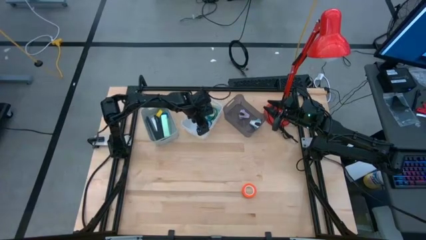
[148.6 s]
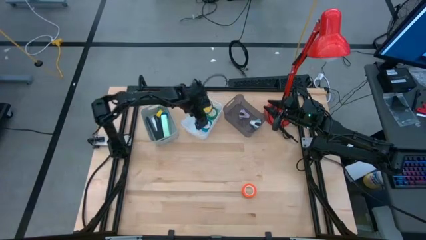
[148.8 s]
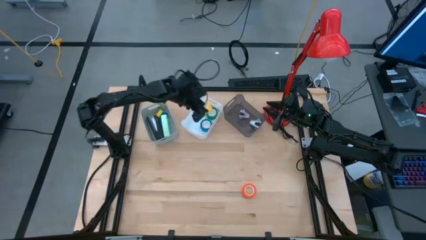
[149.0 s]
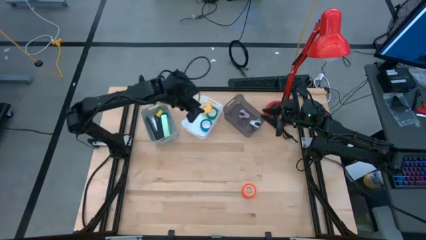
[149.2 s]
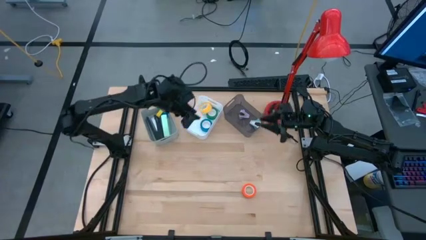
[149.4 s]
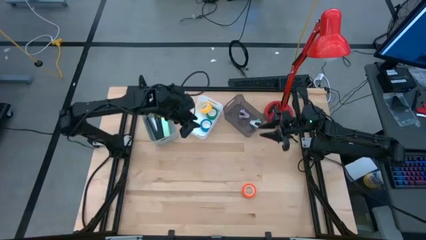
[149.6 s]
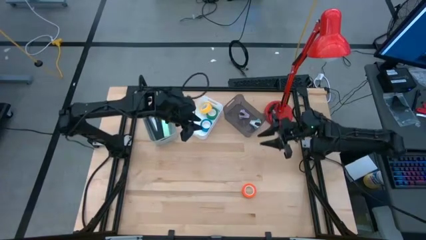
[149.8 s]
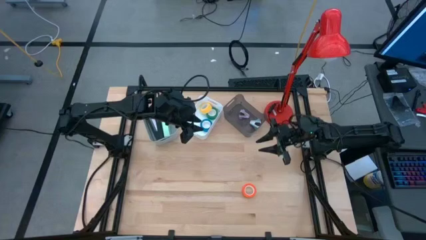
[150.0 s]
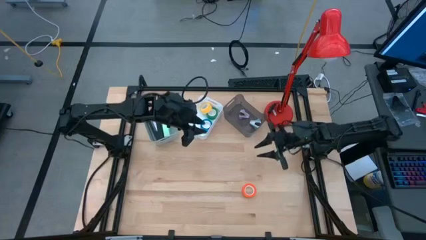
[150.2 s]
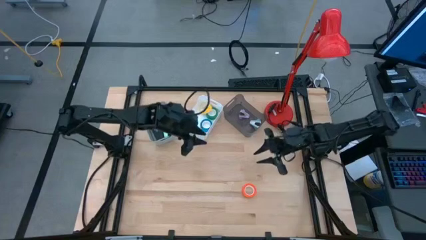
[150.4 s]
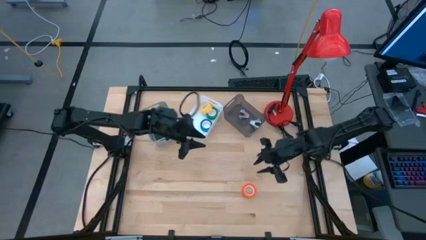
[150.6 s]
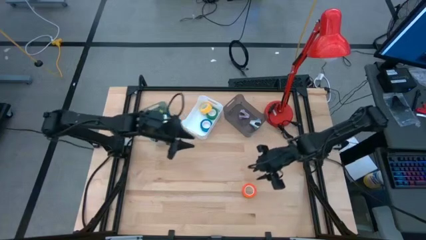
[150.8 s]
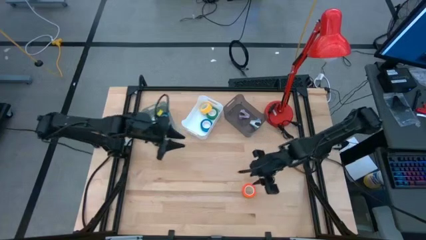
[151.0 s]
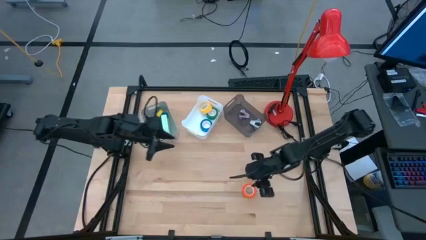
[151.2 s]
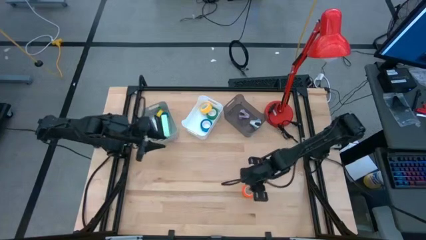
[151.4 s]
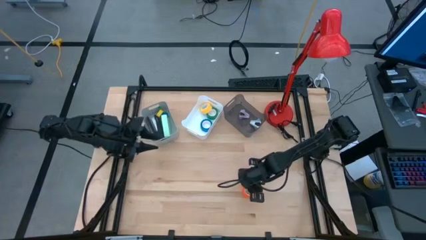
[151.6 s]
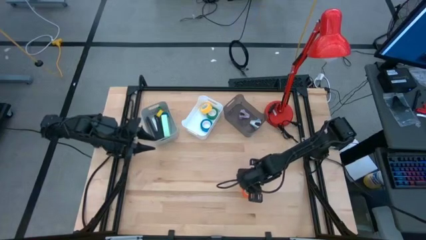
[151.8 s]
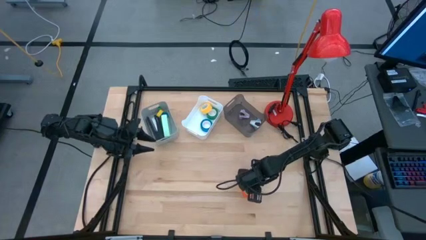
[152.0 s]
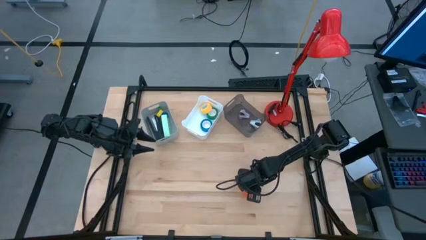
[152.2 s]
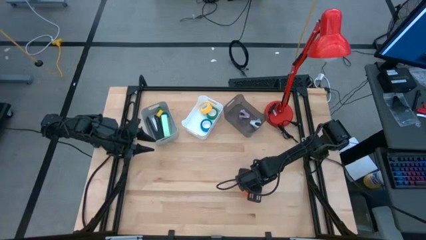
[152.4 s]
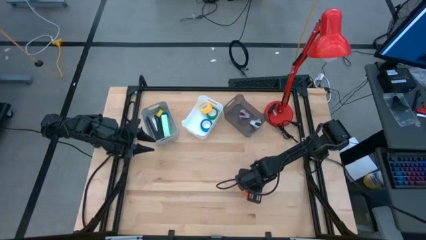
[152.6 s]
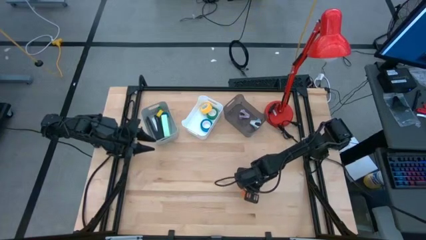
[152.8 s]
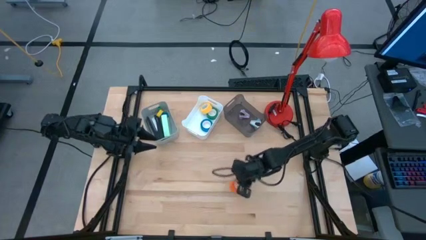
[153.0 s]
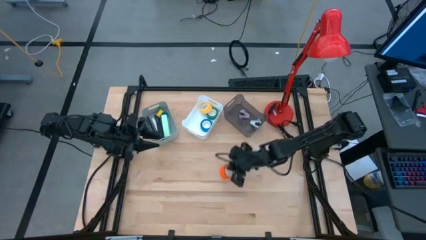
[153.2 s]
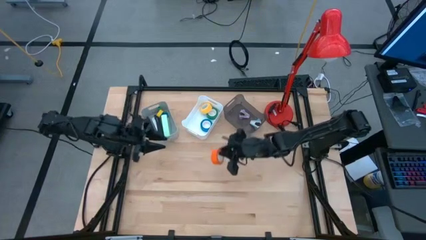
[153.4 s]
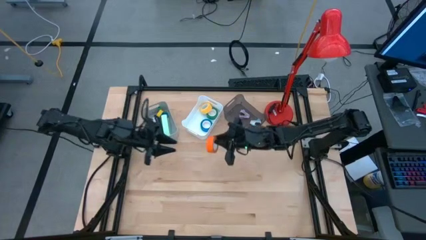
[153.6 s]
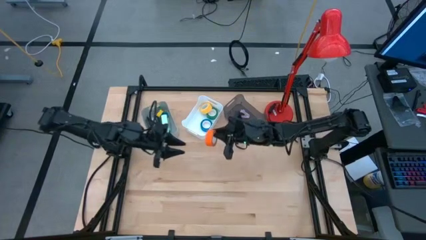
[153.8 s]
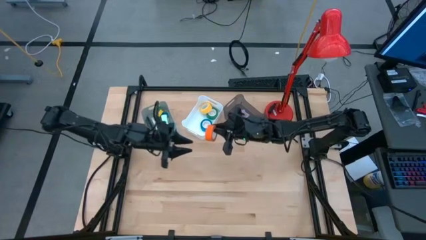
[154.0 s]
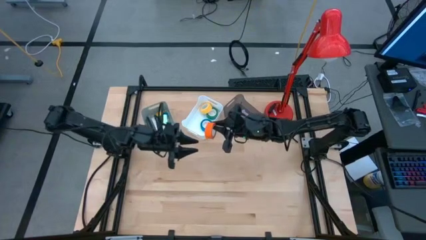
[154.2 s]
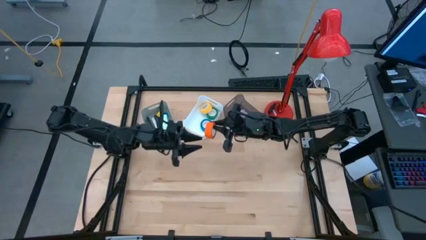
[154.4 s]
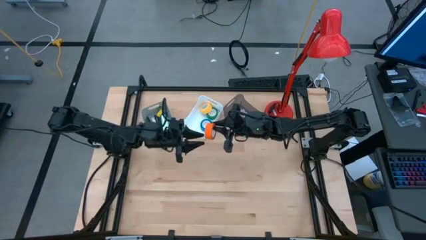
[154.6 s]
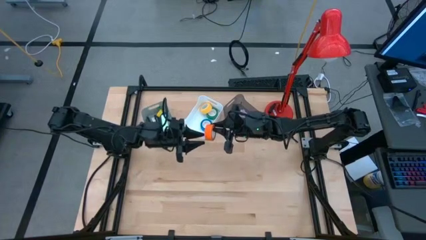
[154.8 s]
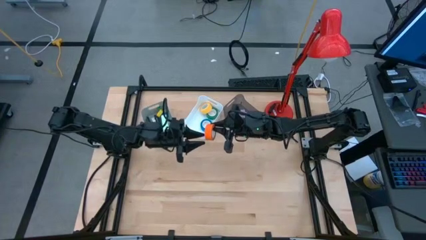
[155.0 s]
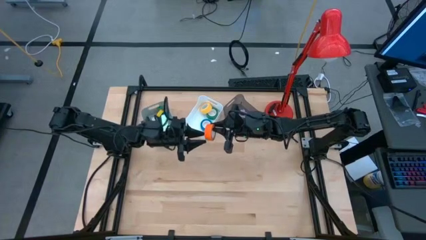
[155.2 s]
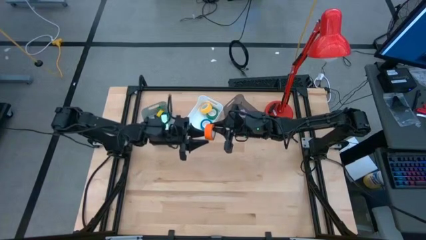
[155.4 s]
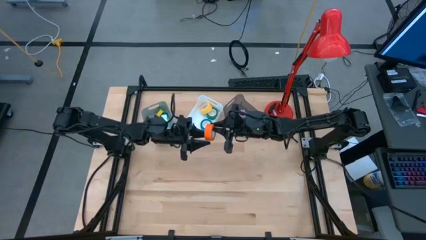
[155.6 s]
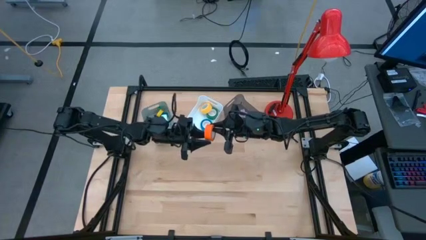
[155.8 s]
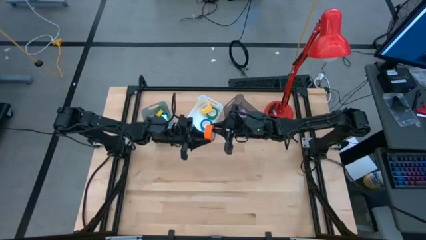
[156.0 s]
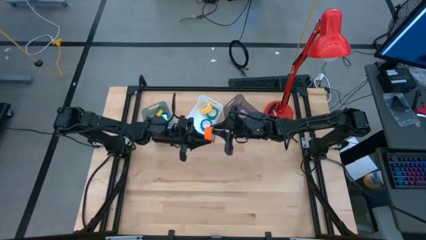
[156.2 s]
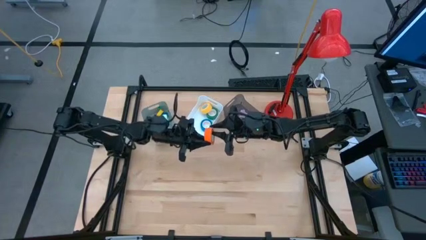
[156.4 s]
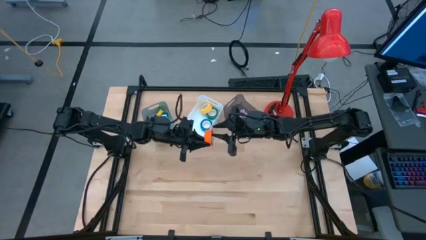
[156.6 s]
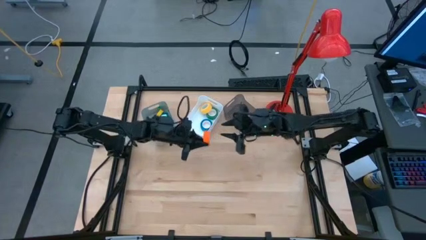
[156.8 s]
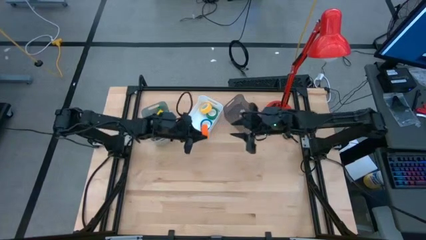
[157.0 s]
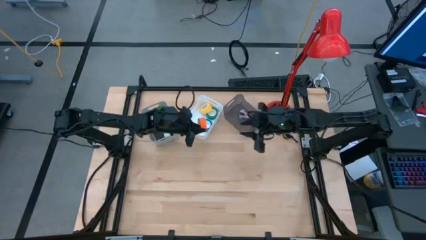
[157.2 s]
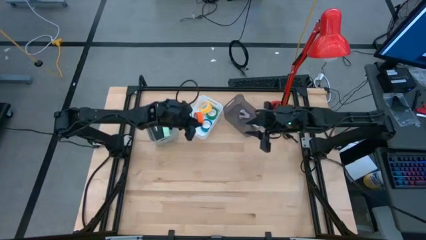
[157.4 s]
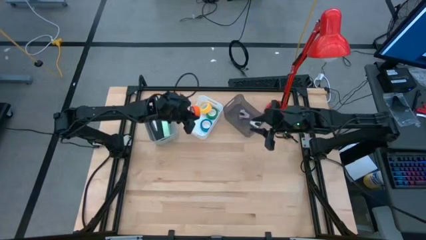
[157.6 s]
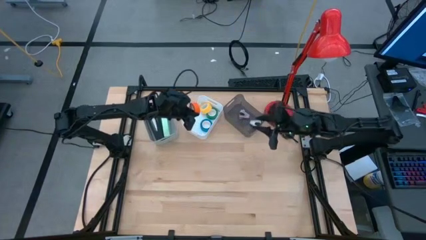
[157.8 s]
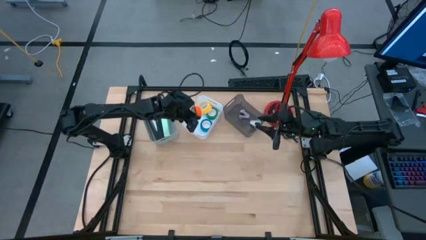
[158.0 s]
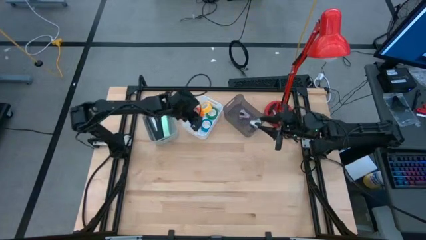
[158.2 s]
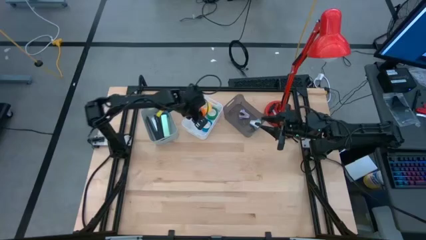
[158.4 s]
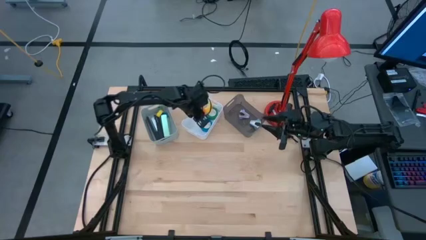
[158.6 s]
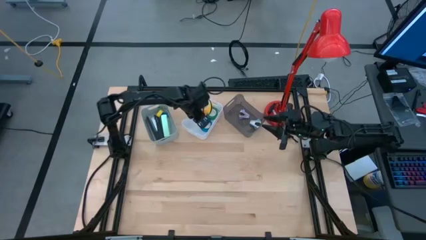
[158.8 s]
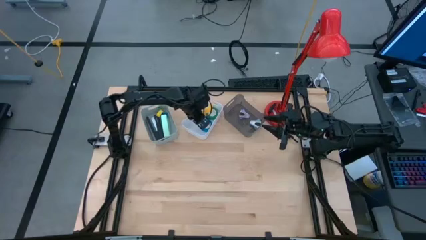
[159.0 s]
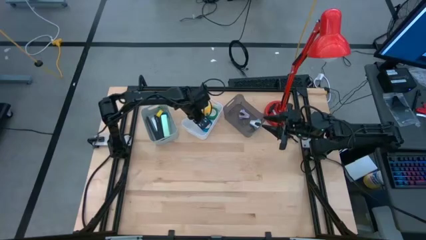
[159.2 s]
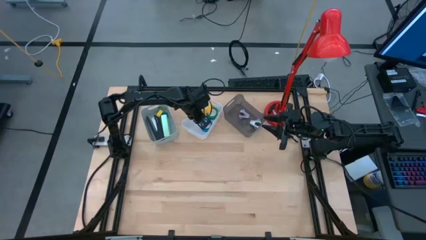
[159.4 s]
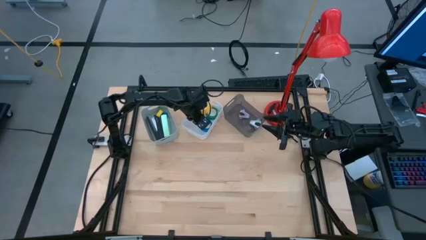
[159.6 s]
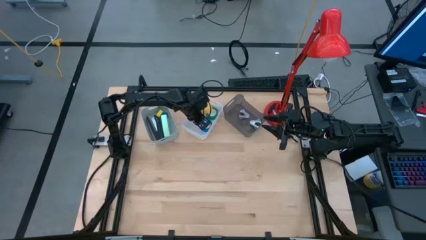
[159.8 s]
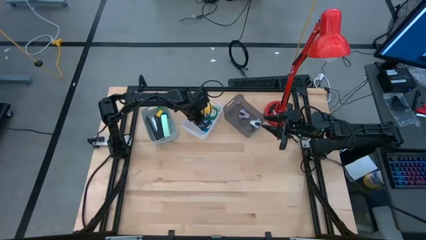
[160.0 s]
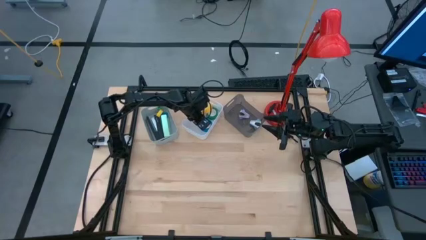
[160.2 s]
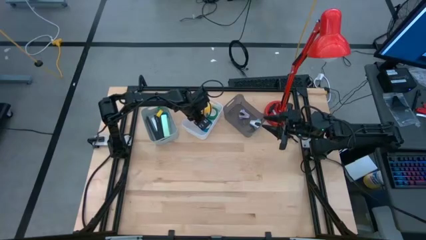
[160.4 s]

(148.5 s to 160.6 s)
Task: Pick and place Stapler, Stapler remover, tape
Put the orange tape into the white bin

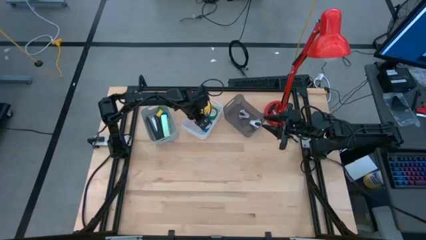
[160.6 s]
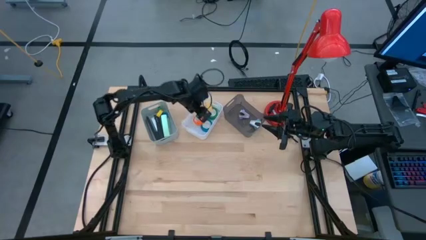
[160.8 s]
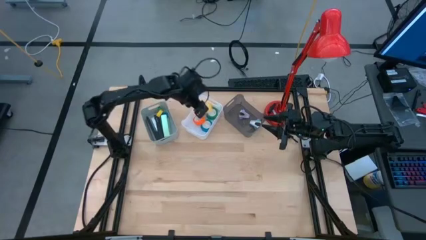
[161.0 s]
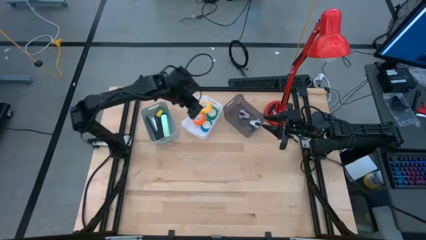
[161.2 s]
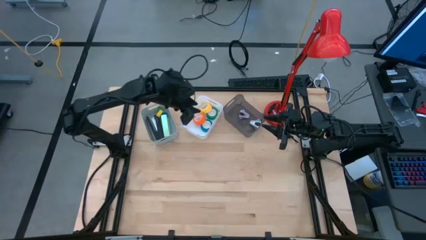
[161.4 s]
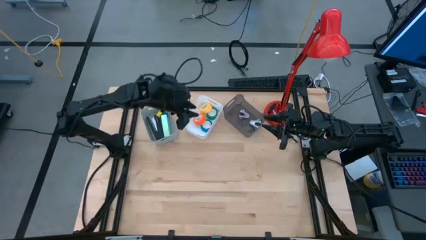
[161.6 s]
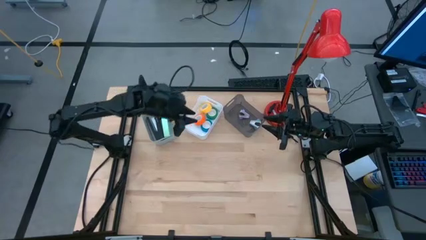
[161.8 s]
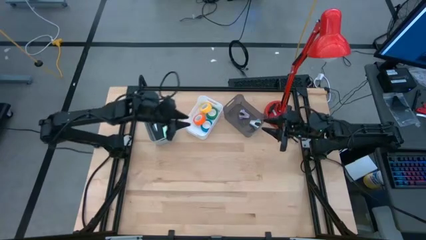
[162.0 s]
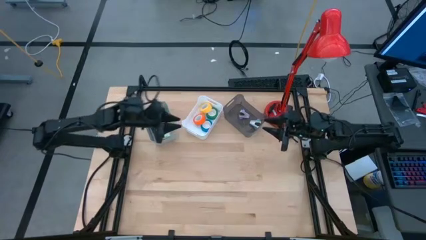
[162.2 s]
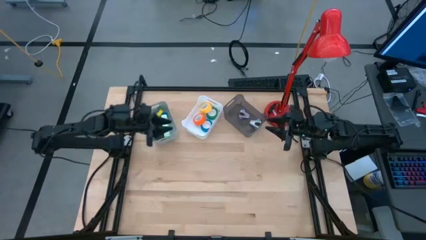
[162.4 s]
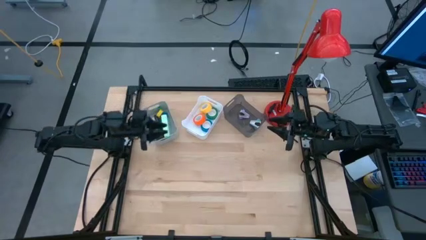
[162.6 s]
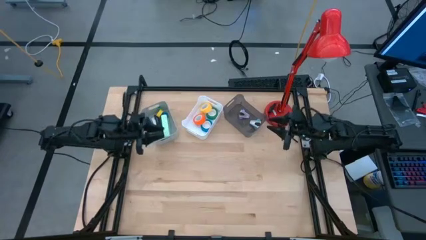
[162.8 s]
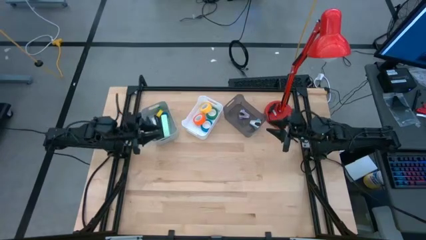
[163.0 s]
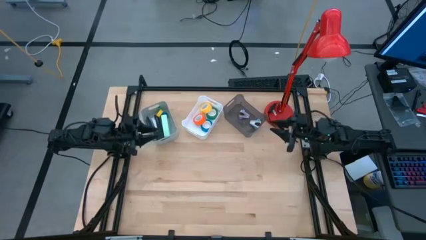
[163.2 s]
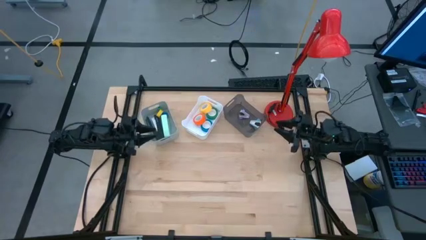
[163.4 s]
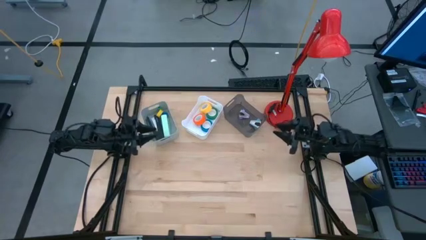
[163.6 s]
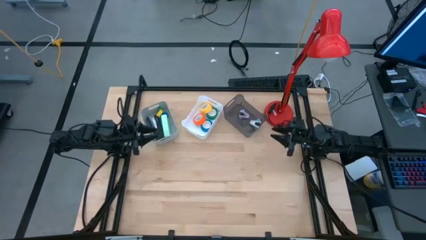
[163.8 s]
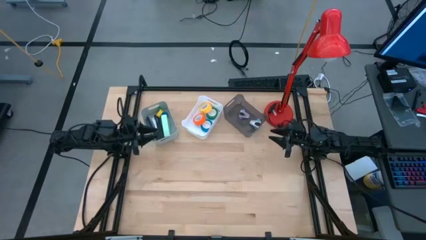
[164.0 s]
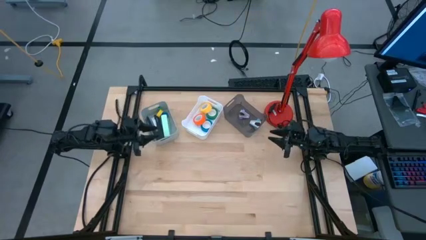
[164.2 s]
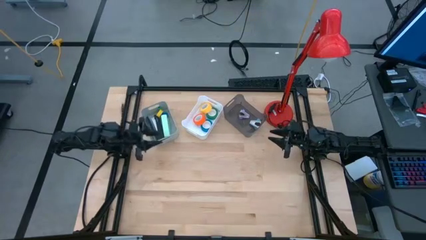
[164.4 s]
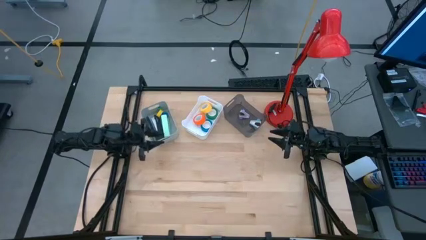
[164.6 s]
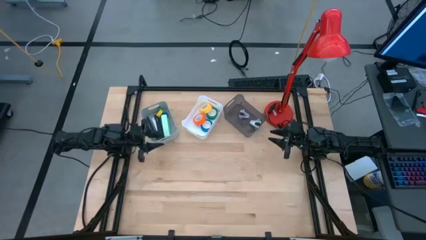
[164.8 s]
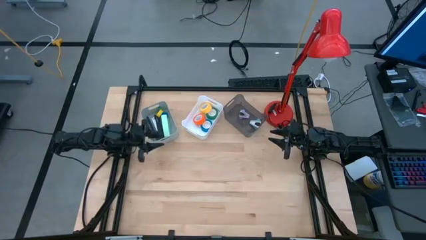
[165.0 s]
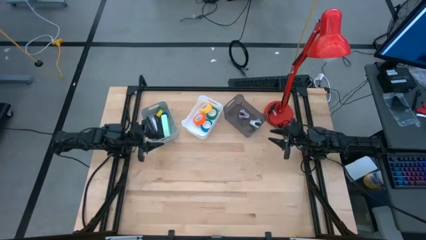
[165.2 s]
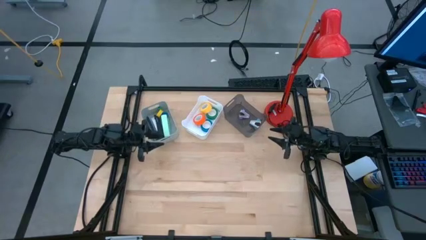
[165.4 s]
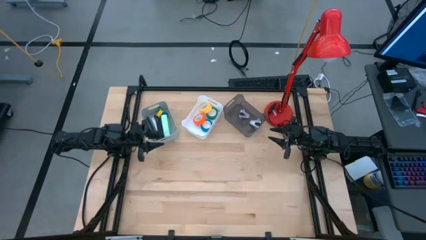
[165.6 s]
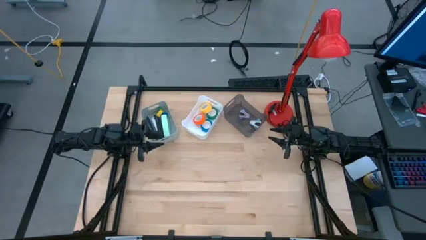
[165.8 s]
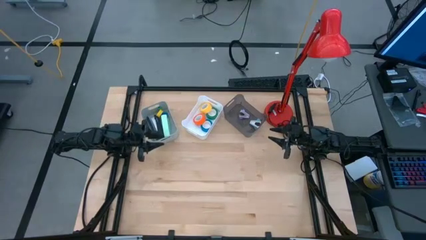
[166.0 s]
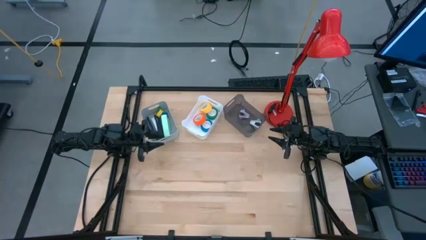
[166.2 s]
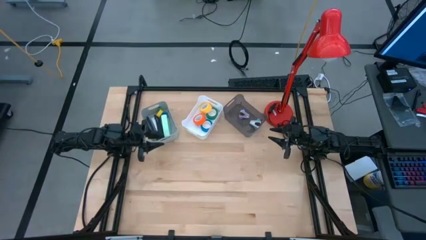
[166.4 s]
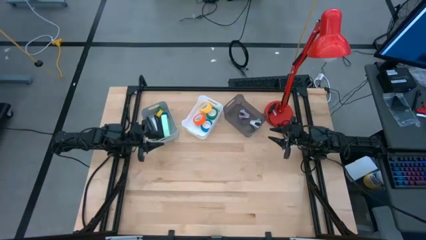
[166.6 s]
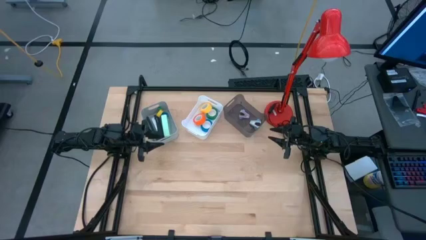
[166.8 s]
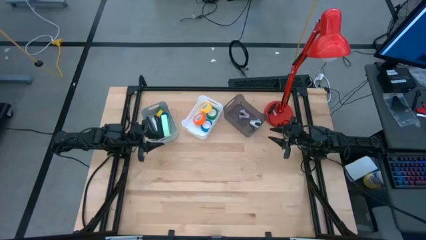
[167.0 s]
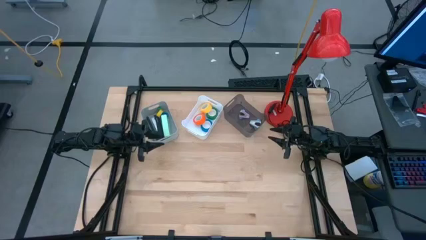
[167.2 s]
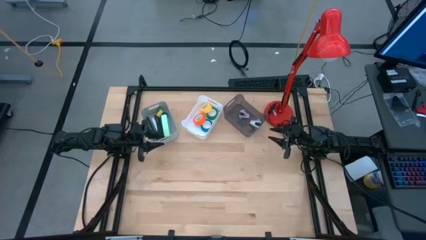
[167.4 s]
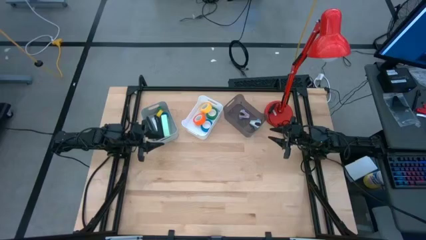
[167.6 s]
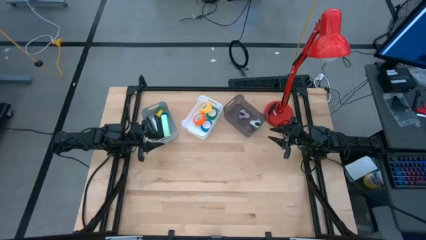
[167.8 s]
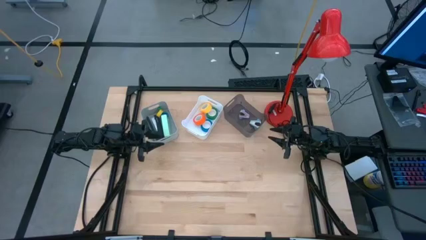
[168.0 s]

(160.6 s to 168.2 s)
Return to Home Position
